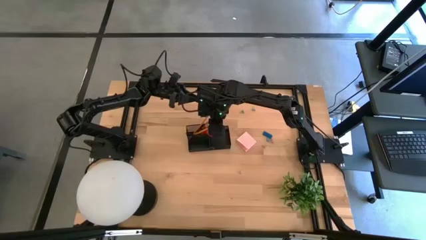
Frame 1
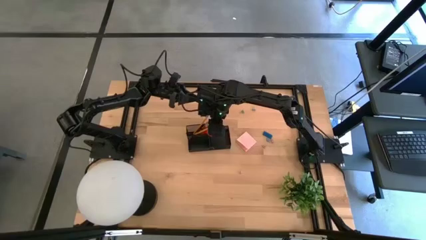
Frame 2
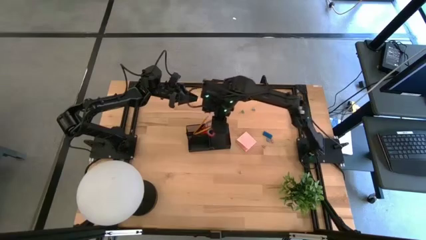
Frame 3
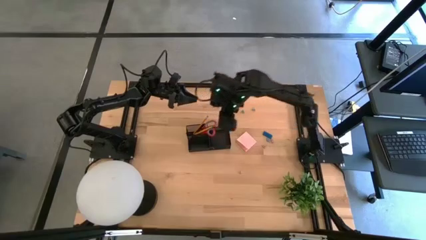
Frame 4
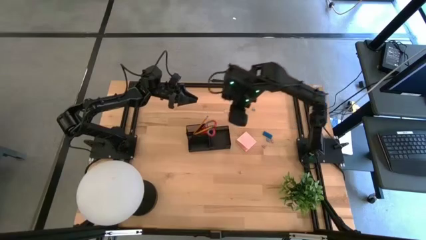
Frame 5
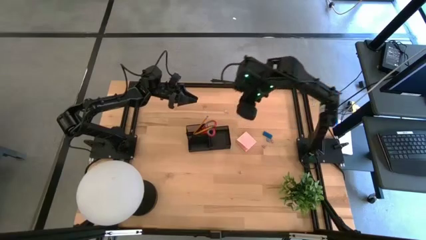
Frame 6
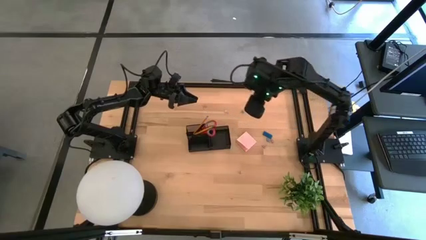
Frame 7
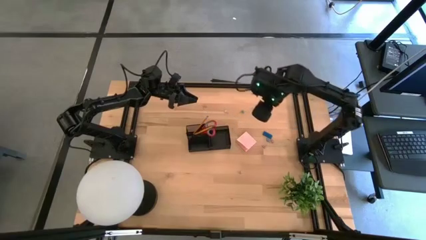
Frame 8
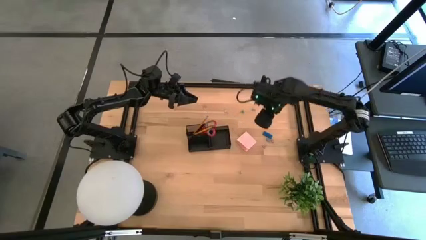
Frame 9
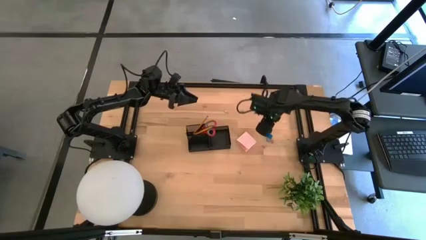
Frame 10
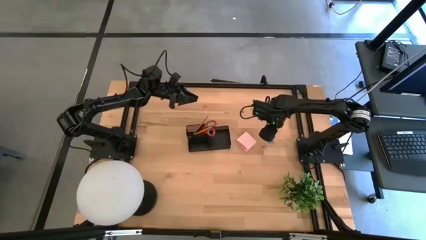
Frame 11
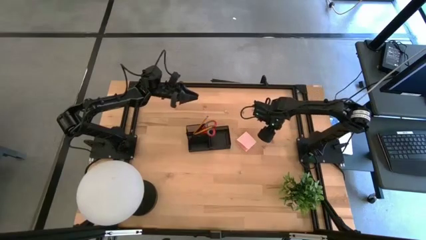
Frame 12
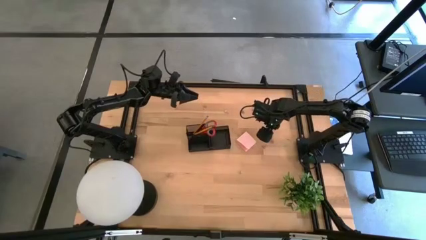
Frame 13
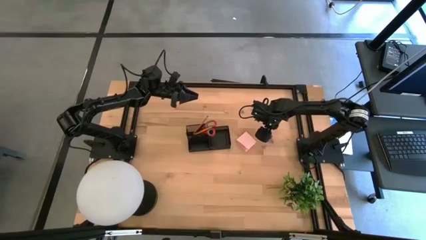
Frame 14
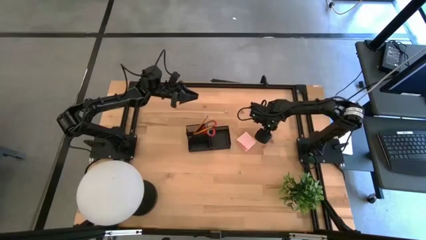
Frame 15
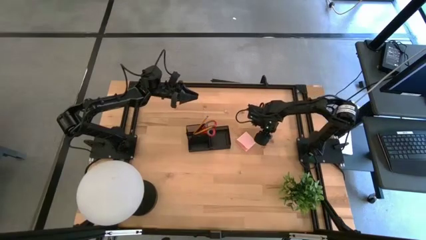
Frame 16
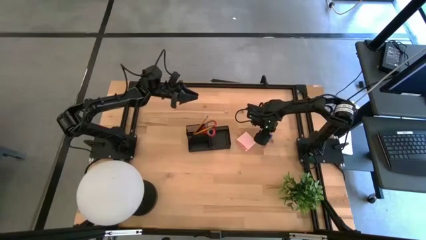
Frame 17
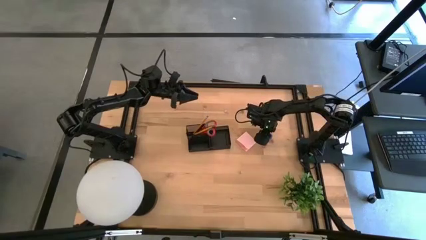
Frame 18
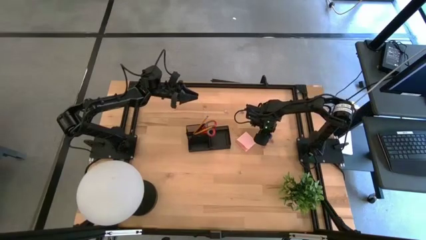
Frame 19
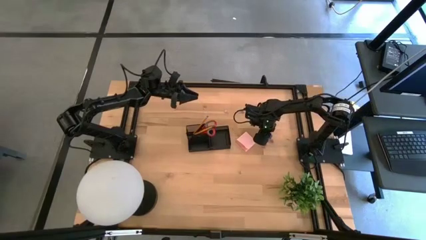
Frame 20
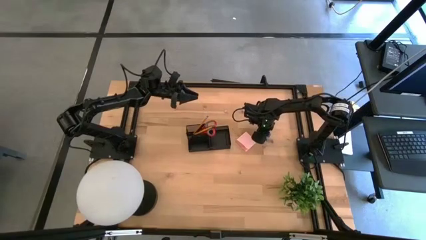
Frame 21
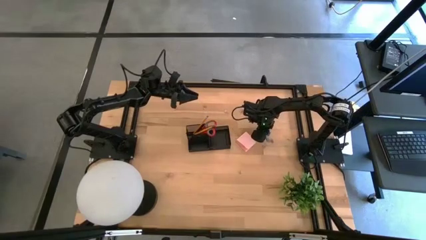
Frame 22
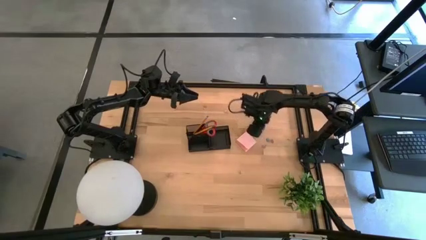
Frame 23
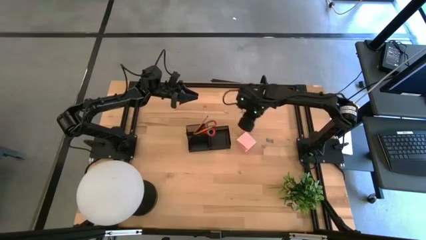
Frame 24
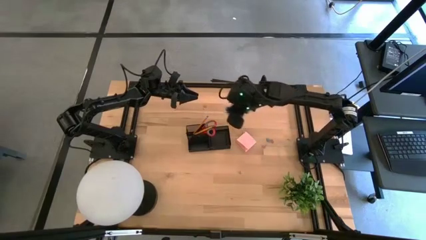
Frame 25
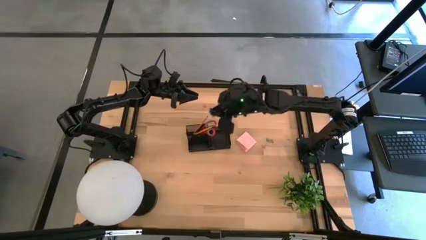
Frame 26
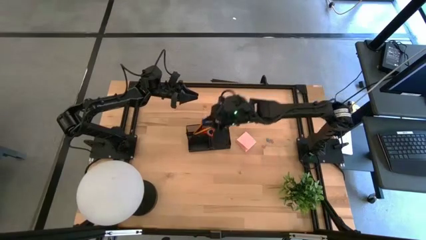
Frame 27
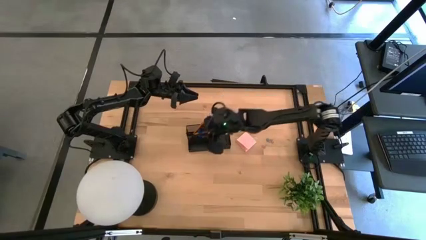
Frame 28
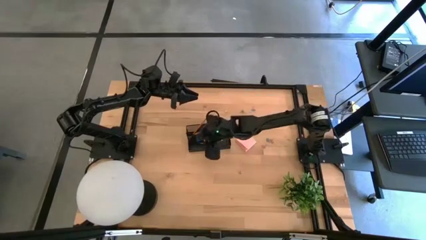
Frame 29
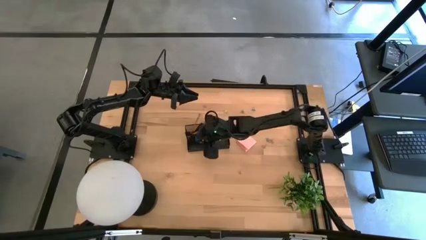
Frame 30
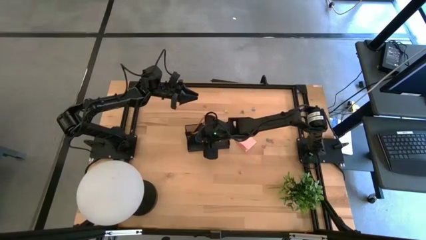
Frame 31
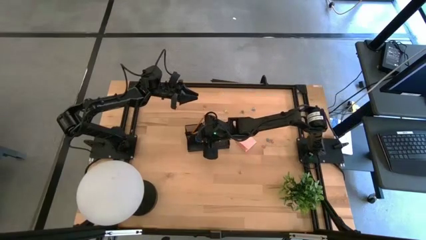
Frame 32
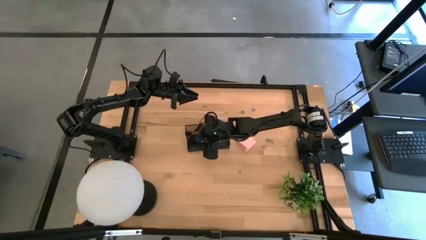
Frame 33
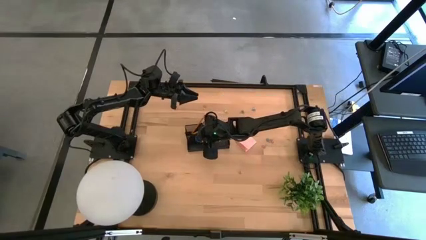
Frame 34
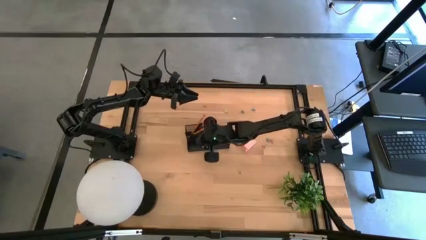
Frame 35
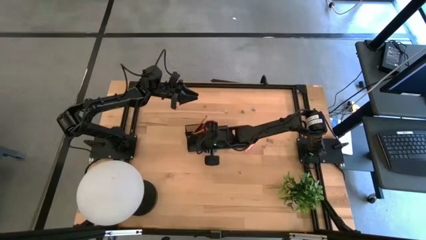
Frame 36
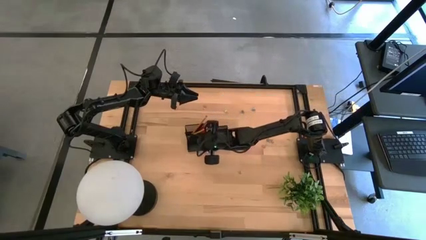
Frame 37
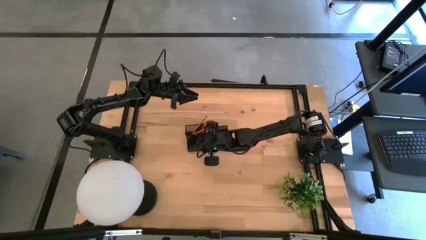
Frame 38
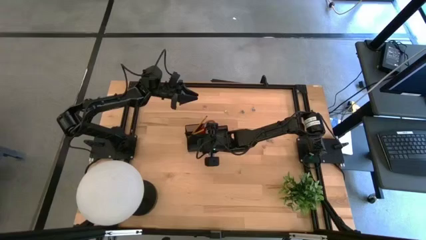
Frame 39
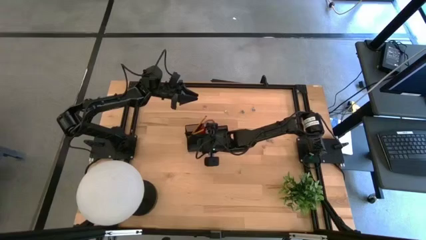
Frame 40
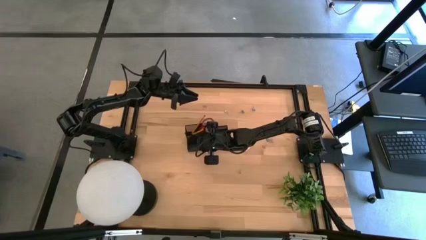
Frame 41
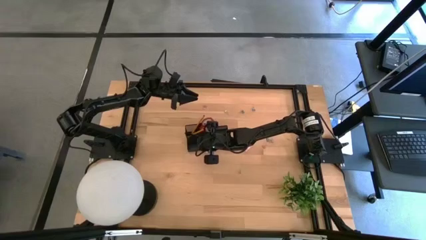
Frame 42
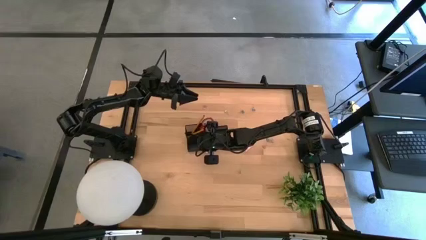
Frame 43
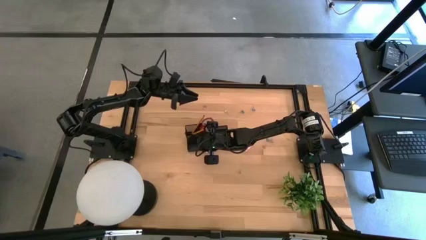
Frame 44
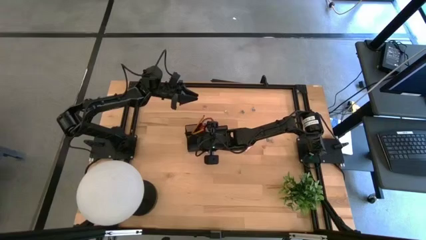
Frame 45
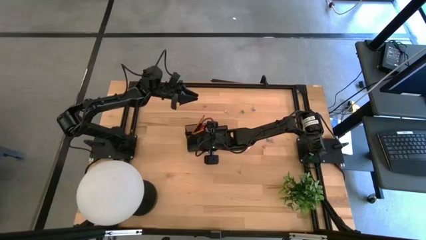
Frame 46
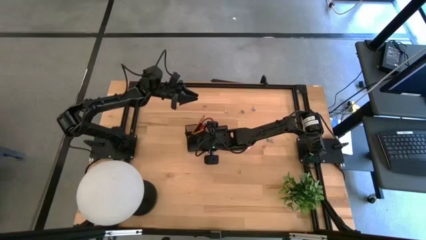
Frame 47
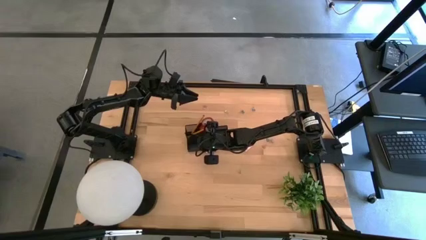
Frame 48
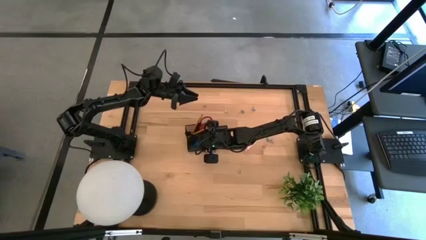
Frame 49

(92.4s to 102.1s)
Task: Pick and place office supplies into organizer
Put the blue eraser into the desk organizer

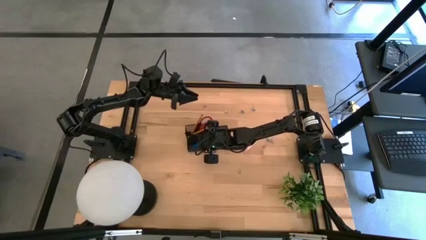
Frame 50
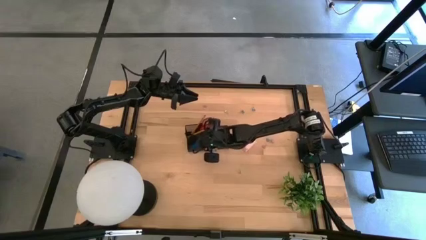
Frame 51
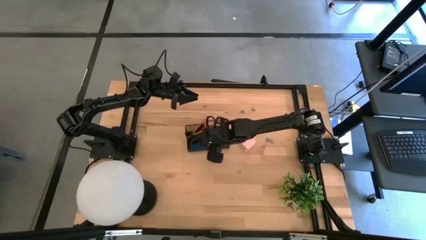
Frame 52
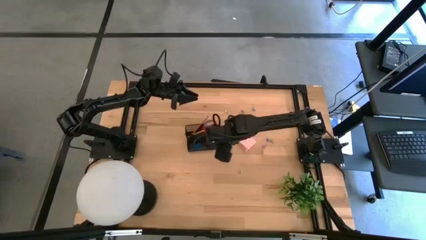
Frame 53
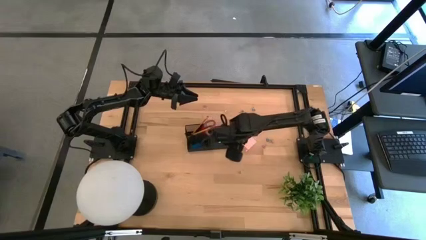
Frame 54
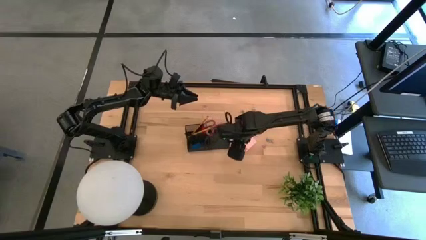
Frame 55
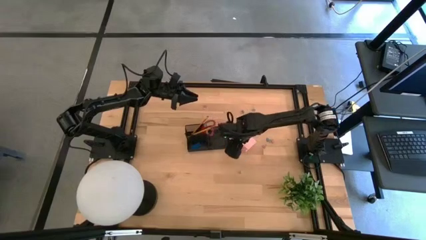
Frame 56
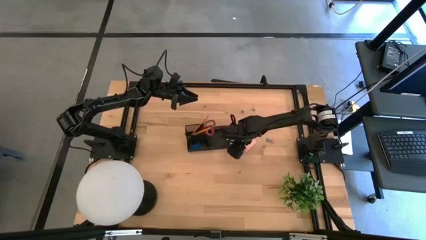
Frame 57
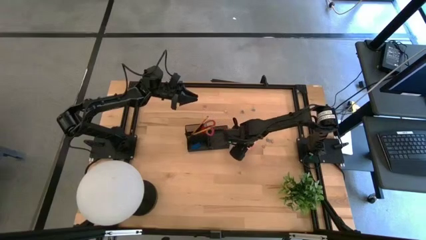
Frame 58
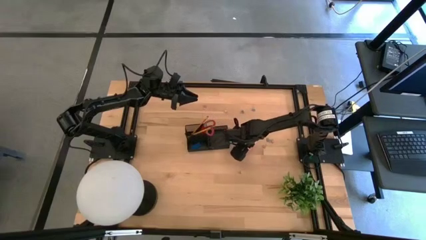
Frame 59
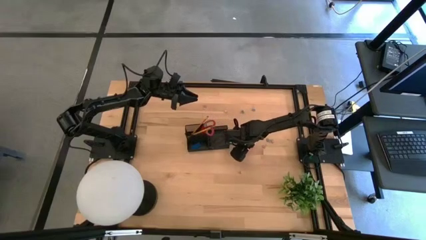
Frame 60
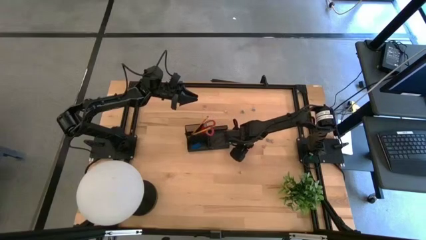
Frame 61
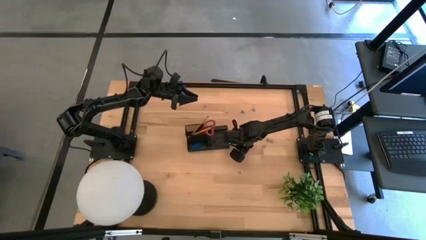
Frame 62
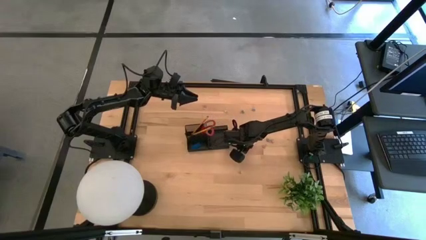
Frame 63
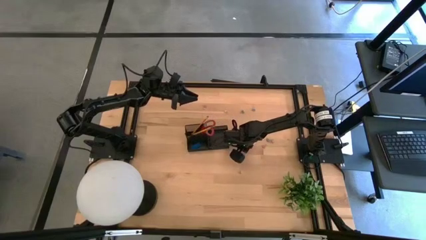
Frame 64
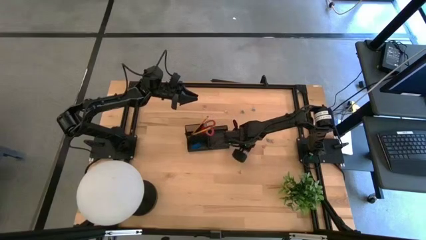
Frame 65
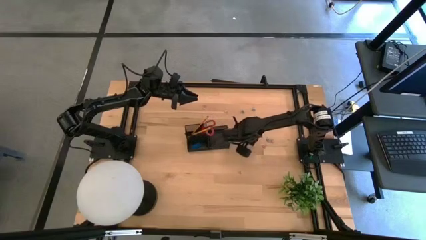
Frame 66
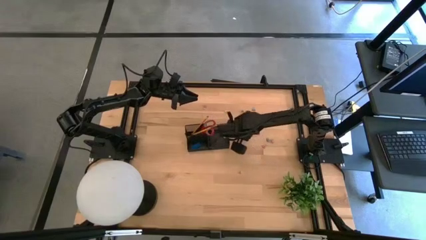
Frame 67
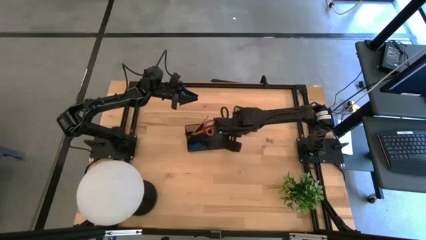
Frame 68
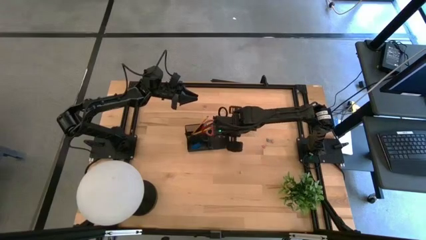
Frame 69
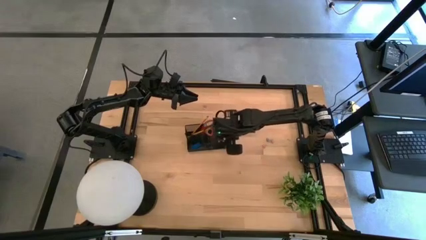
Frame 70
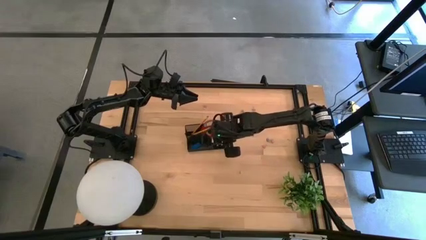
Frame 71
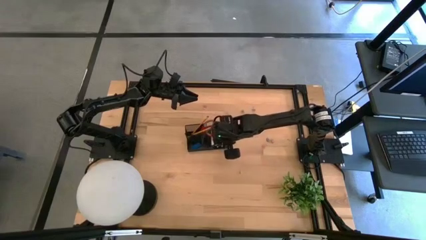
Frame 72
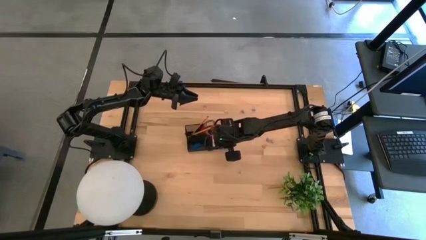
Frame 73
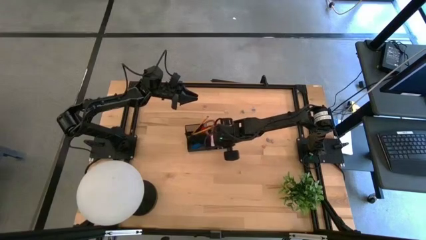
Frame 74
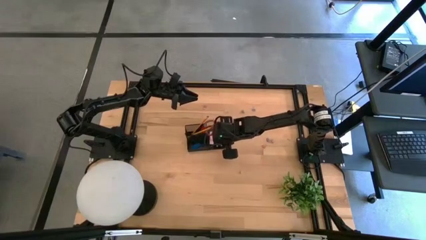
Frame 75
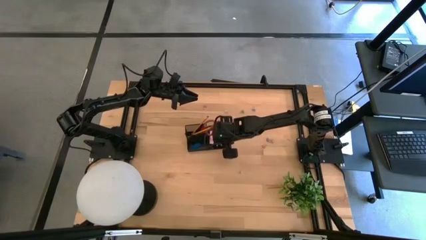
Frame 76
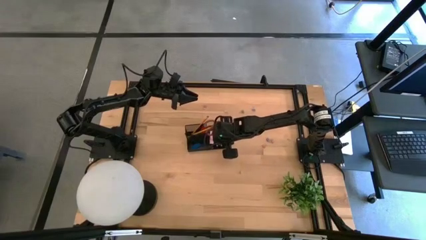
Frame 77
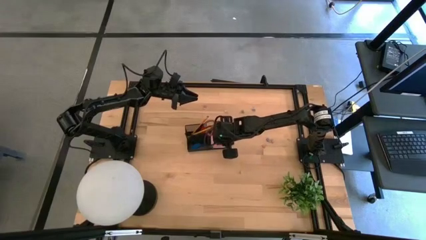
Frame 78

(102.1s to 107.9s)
Put the pink sticky note pad into the desk organizer
